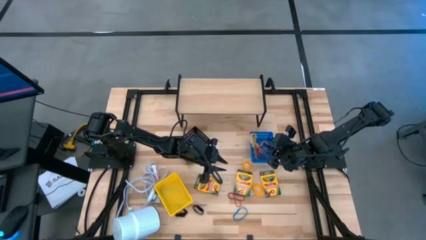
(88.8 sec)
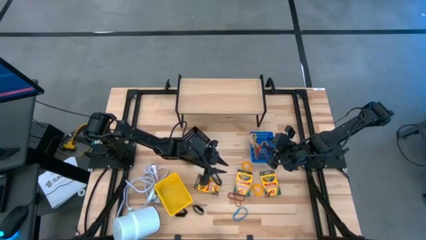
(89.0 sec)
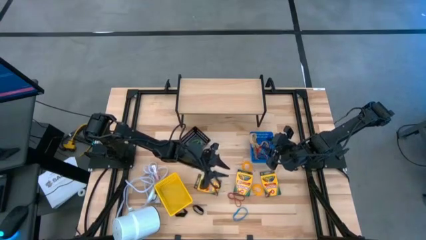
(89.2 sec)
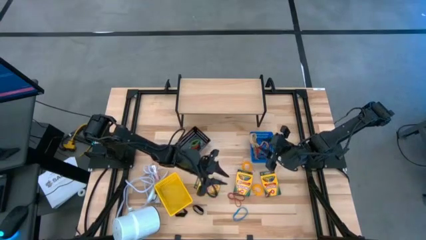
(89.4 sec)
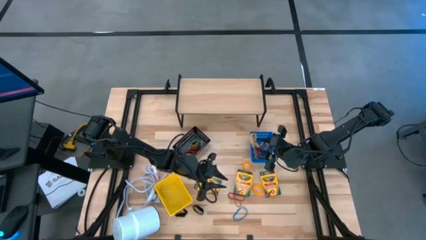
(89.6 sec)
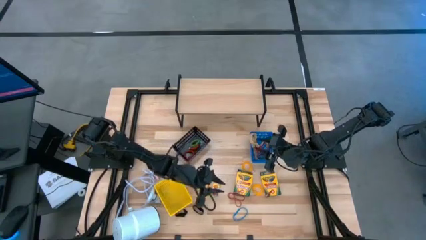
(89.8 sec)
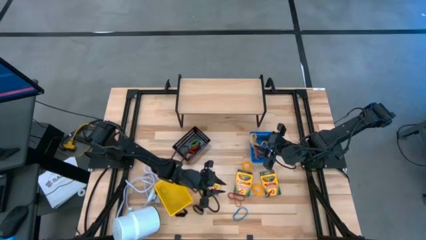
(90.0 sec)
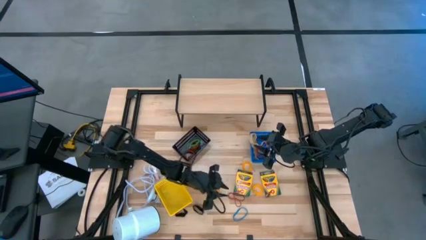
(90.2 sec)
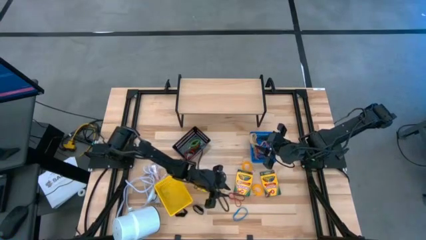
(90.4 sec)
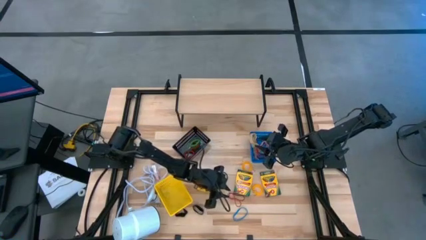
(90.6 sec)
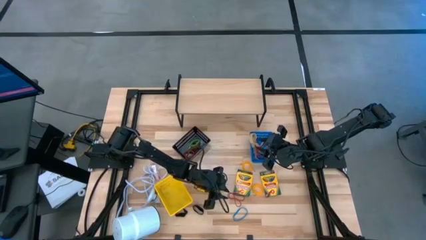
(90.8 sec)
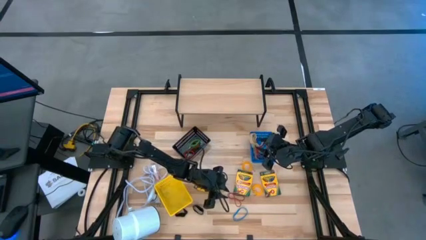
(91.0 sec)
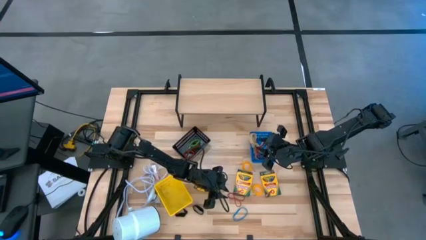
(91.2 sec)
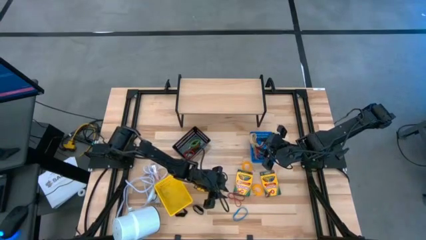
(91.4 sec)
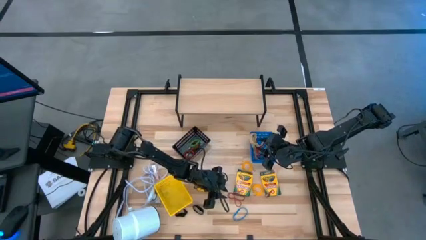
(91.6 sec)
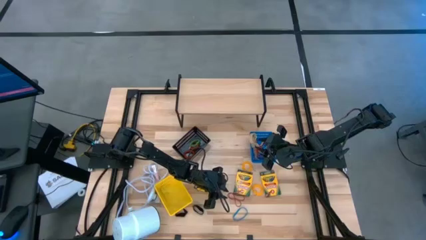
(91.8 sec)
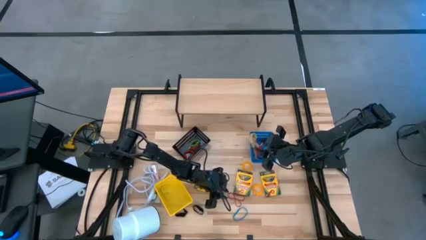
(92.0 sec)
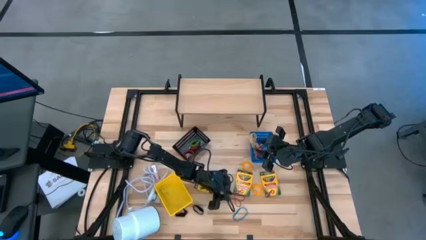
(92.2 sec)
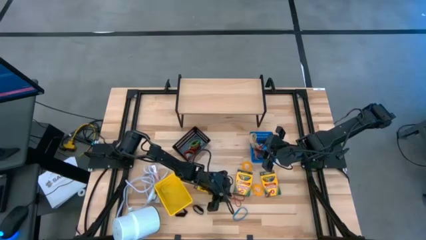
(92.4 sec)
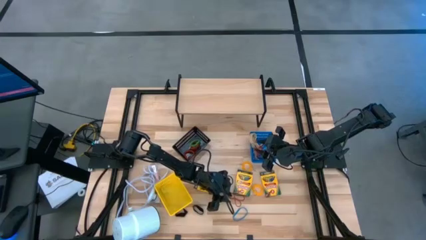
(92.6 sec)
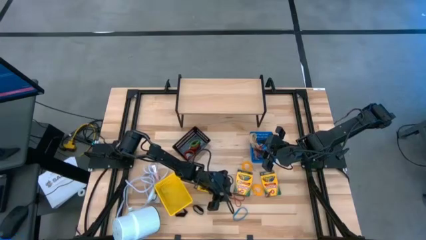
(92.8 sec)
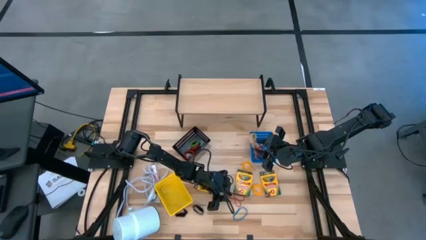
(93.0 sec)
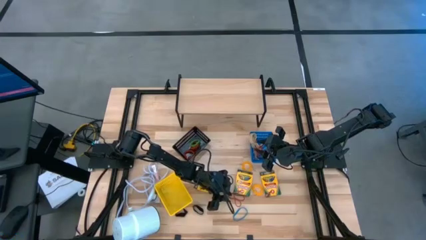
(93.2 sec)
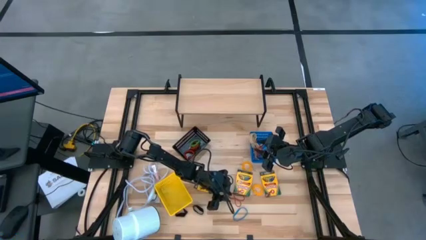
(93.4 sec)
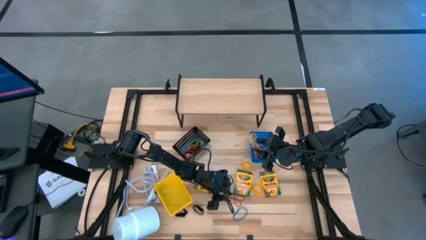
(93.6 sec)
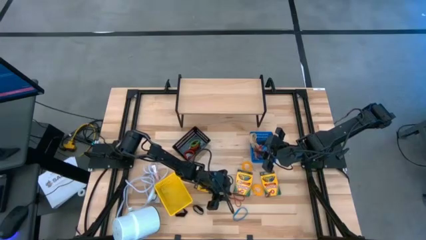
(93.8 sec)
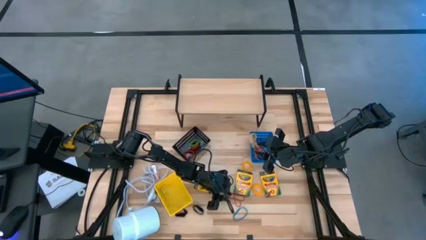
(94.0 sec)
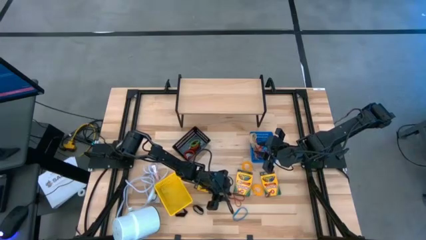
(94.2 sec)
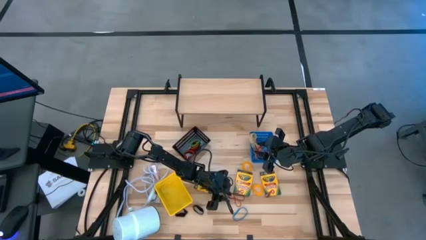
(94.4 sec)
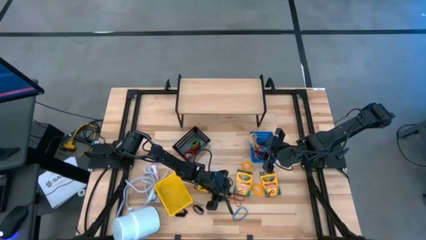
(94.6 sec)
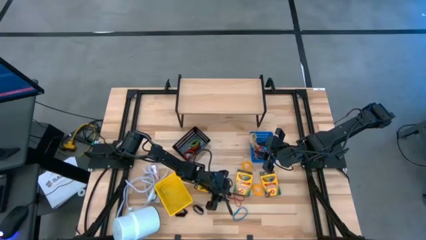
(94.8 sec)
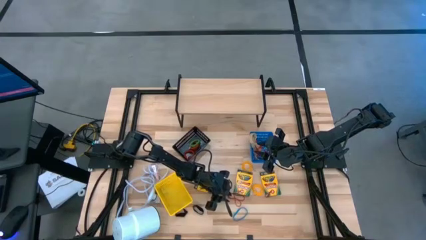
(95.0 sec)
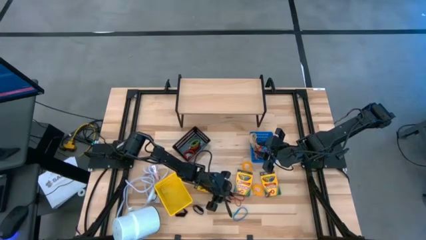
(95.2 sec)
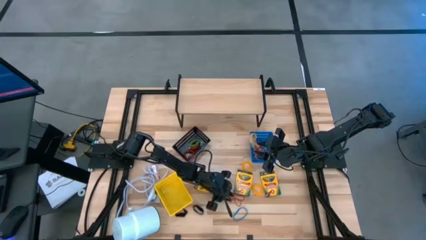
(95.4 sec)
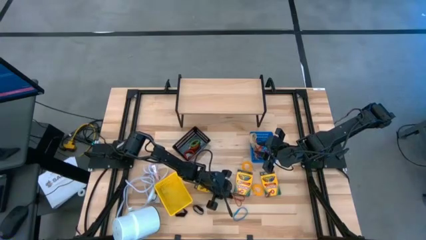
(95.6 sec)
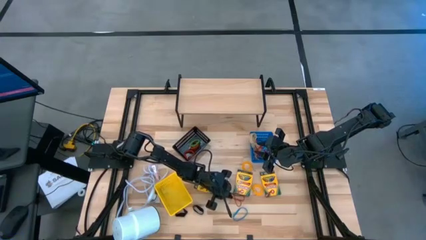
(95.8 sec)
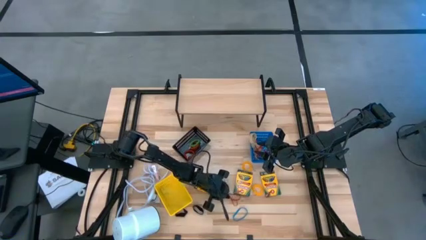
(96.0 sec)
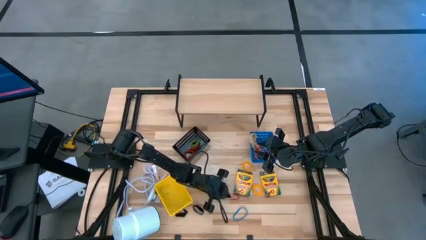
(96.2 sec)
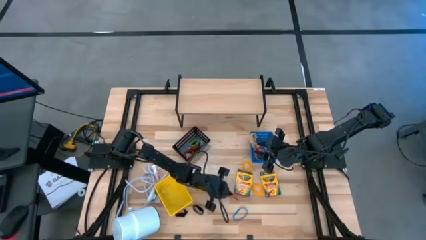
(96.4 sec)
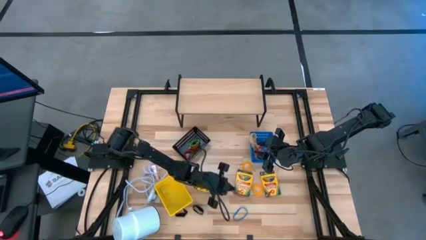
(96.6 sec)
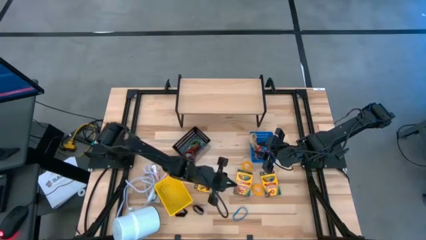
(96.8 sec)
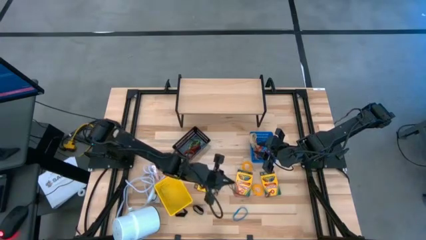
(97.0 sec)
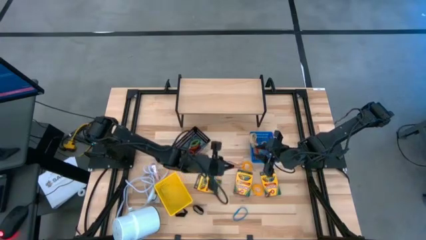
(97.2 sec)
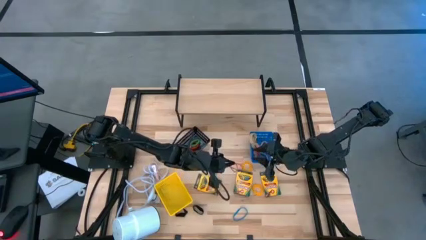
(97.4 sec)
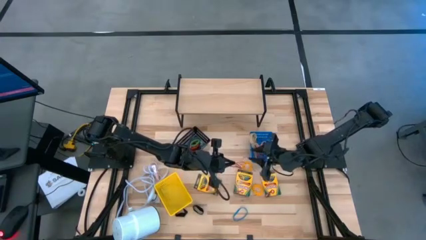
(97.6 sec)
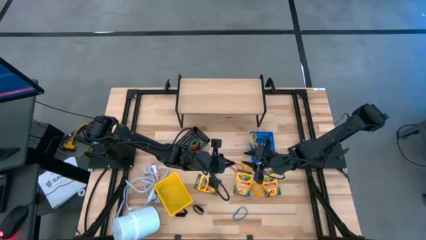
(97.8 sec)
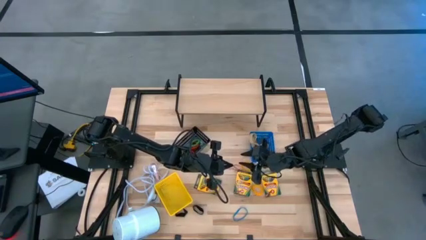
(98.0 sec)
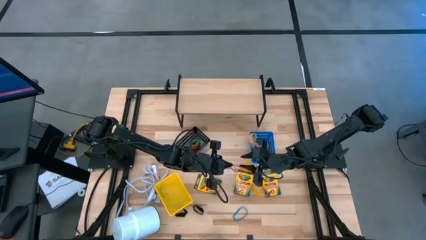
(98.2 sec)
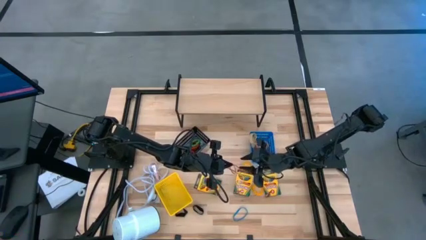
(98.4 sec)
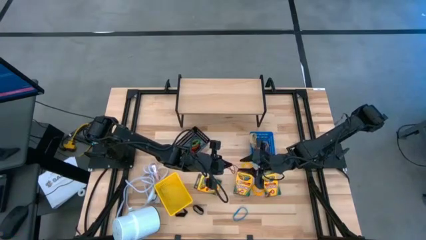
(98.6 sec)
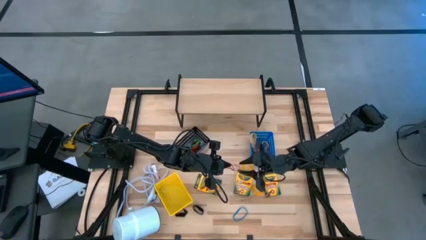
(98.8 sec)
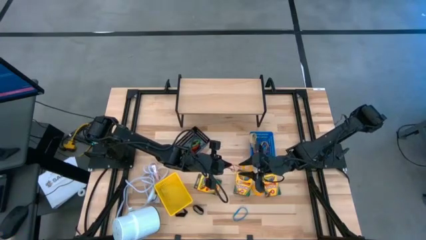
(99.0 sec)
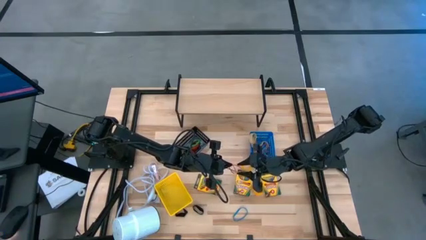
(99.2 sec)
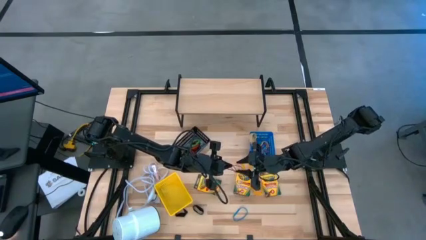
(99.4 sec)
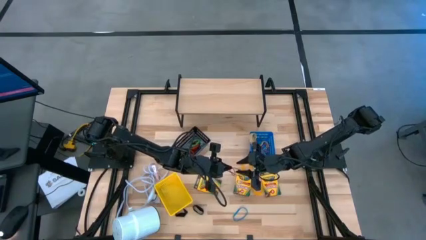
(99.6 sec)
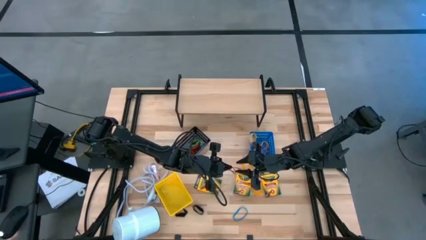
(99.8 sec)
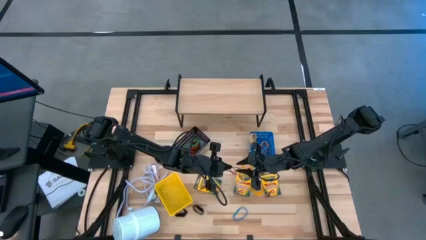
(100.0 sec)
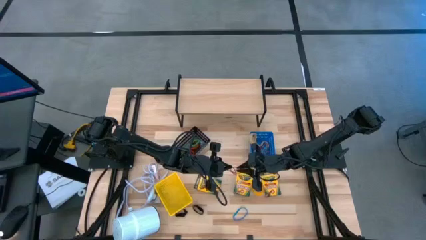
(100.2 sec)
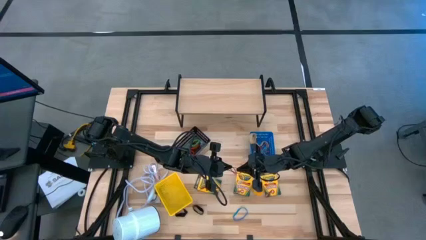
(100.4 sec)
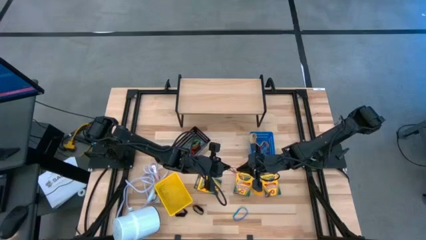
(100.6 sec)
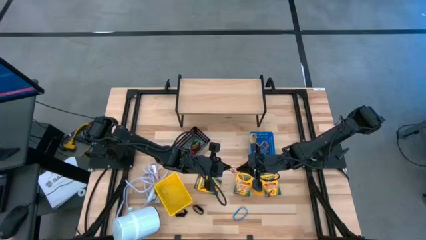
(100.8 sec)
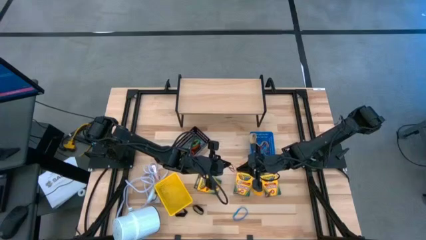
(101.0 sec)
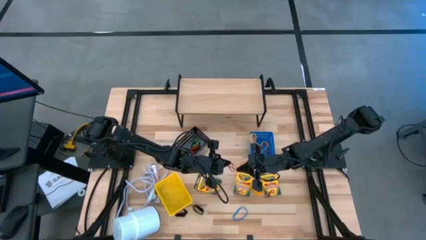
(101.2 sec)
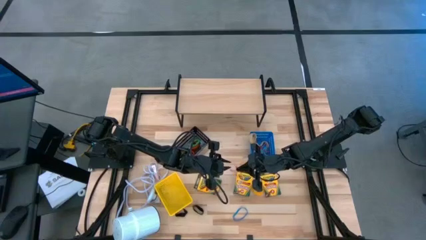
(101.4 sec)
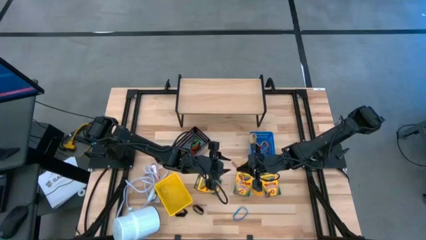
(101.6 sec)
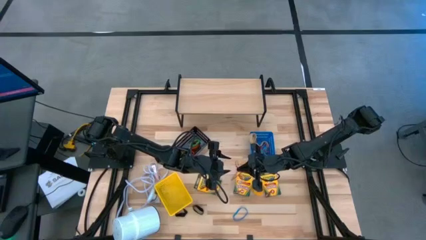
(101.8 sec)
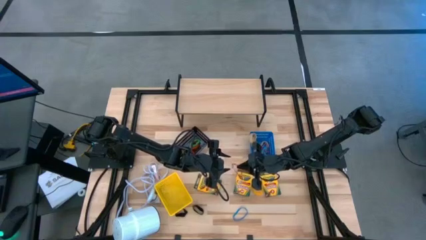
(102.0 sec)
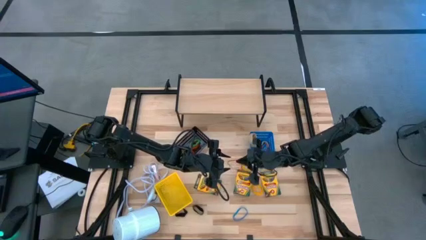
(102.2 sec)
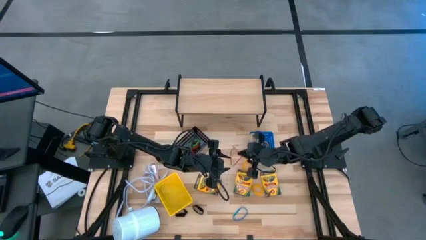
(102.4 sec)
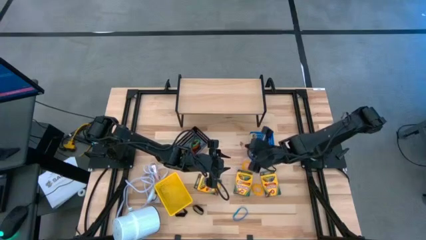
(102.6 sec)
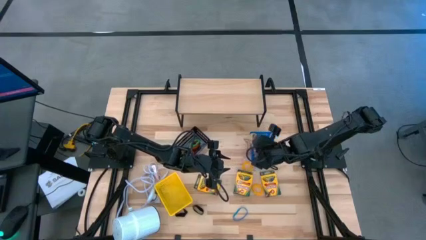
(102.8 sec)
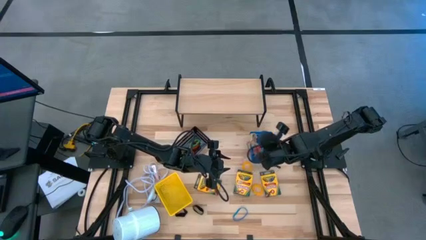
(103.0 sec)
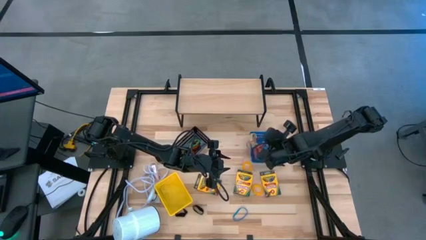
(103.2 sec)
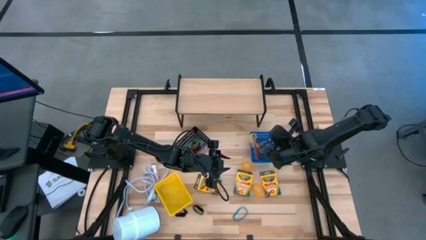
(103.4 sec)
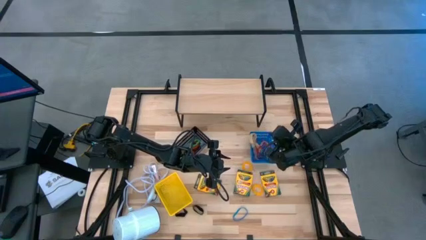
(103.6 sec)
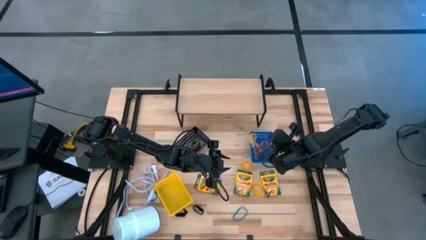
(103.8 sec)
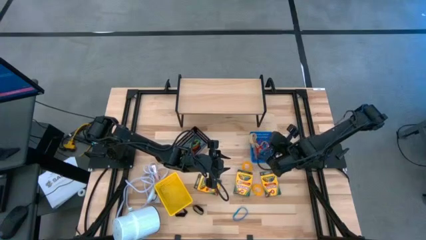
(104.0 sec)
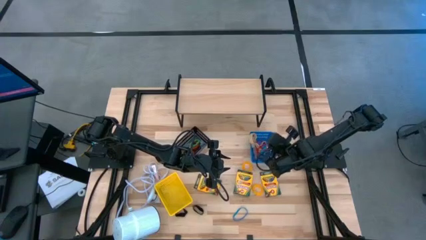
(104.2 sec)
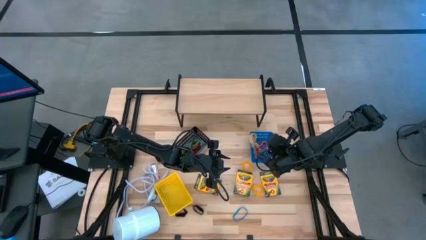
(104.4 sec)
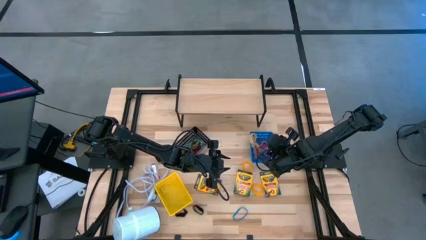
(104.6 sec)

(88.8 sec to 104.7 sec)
Task: Pick & Place Office Desk Supplies
Put the red rubber band into the blue bin
